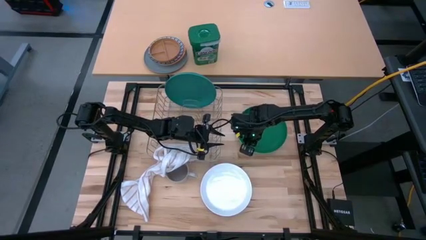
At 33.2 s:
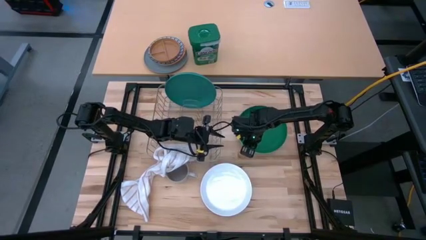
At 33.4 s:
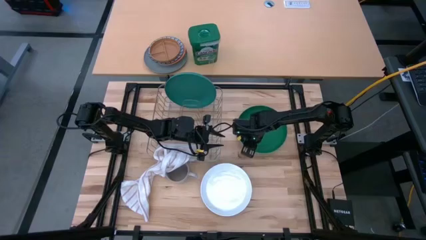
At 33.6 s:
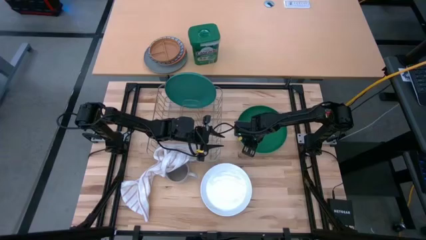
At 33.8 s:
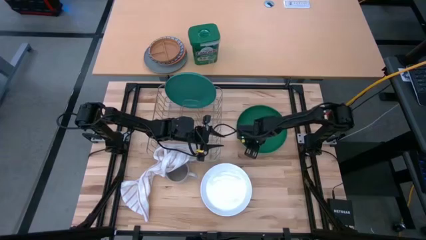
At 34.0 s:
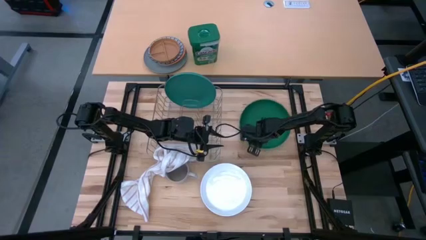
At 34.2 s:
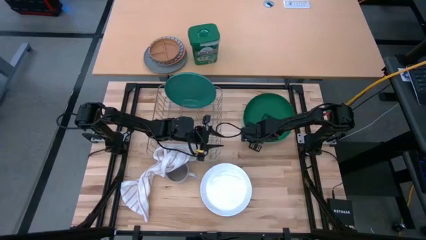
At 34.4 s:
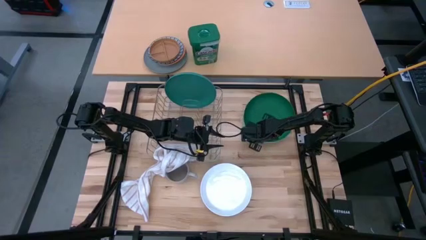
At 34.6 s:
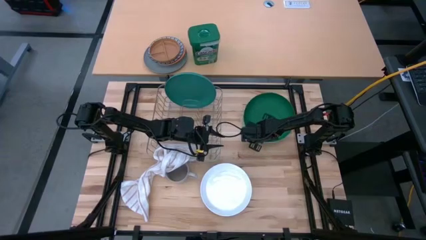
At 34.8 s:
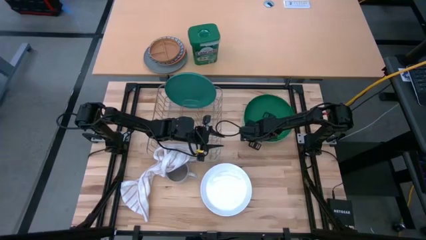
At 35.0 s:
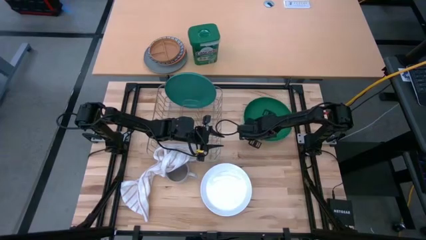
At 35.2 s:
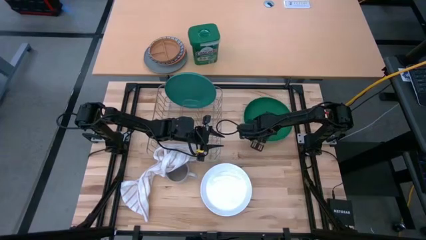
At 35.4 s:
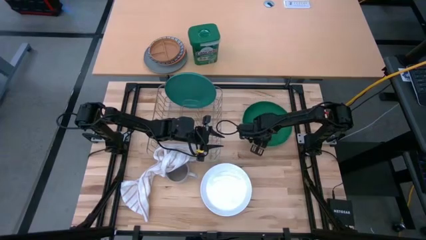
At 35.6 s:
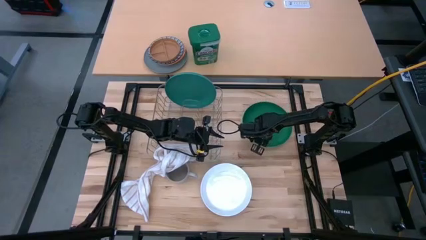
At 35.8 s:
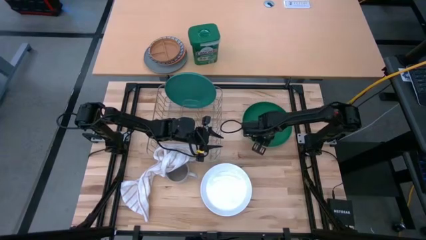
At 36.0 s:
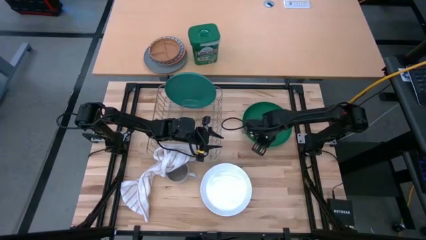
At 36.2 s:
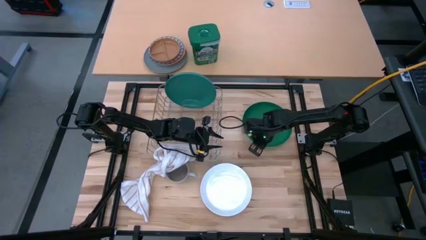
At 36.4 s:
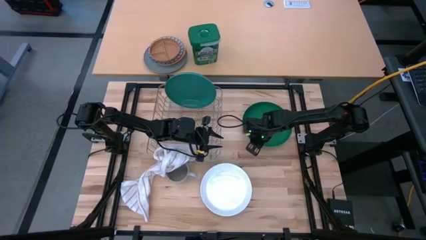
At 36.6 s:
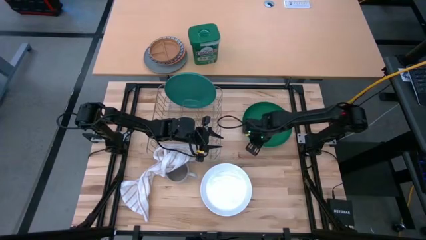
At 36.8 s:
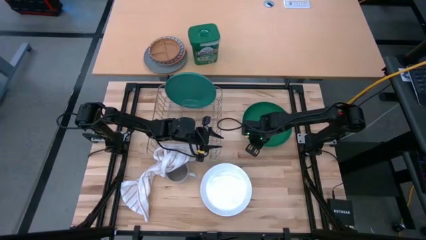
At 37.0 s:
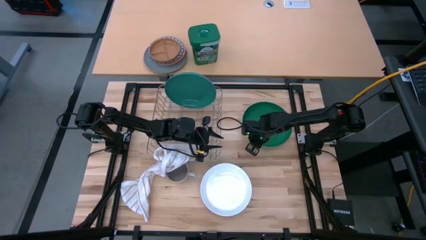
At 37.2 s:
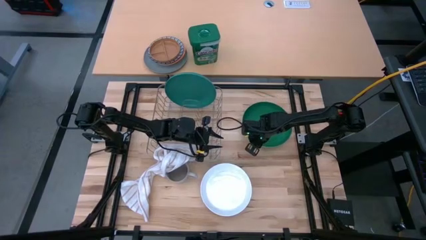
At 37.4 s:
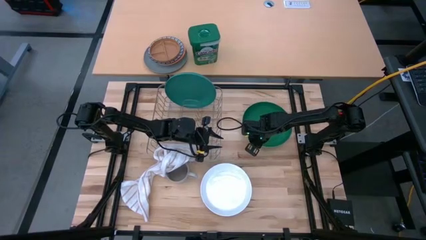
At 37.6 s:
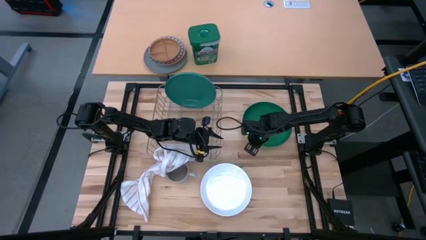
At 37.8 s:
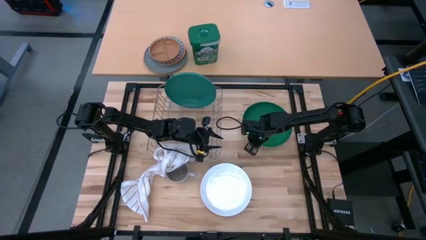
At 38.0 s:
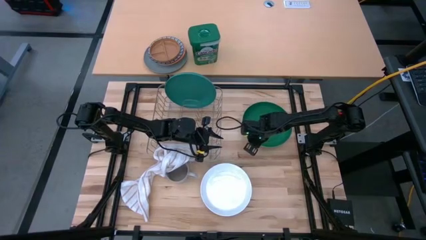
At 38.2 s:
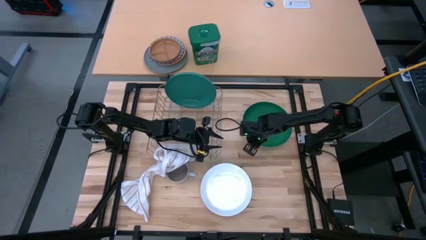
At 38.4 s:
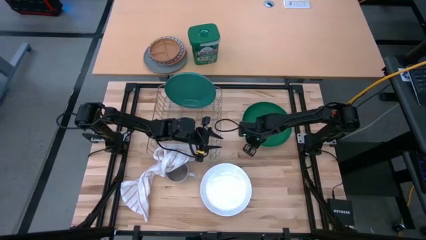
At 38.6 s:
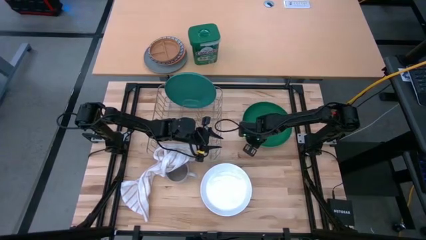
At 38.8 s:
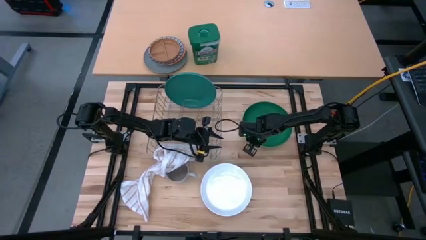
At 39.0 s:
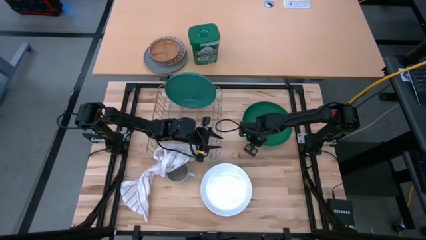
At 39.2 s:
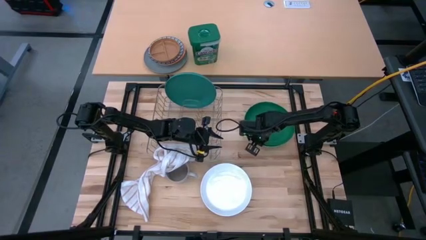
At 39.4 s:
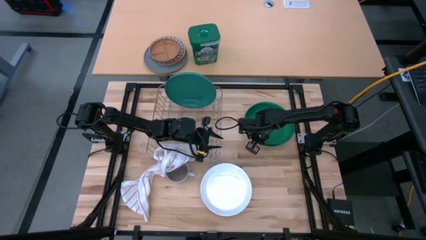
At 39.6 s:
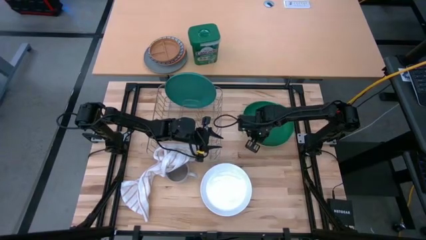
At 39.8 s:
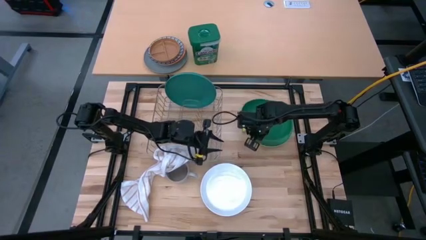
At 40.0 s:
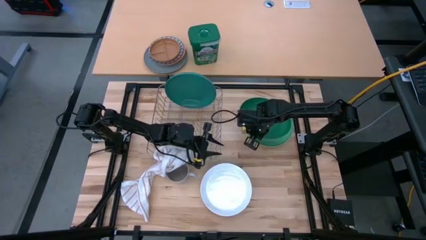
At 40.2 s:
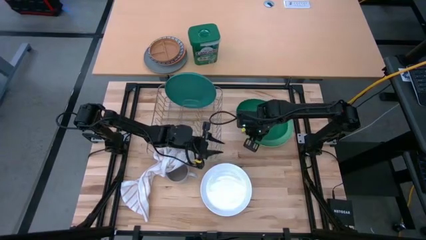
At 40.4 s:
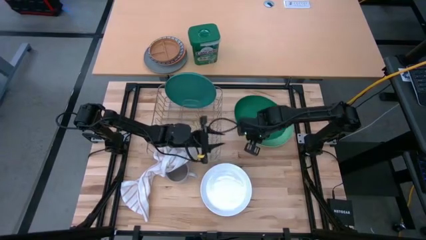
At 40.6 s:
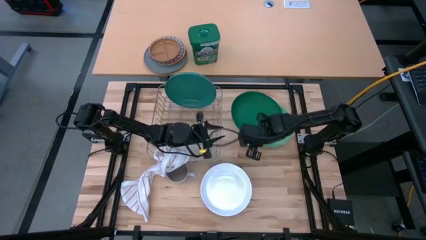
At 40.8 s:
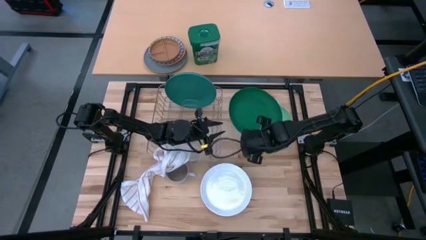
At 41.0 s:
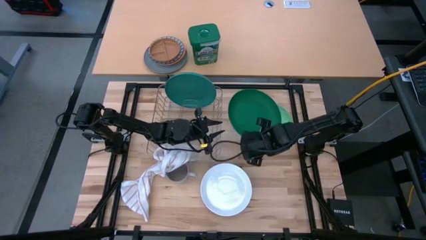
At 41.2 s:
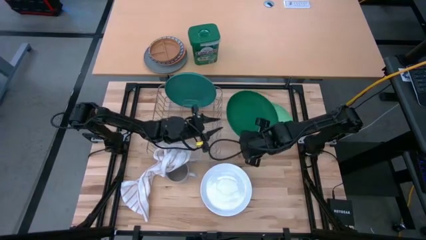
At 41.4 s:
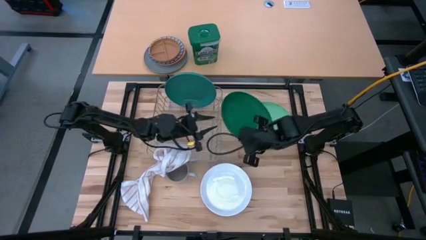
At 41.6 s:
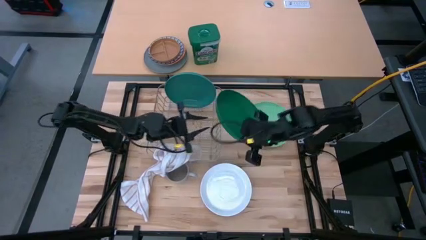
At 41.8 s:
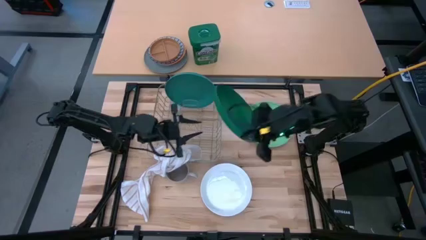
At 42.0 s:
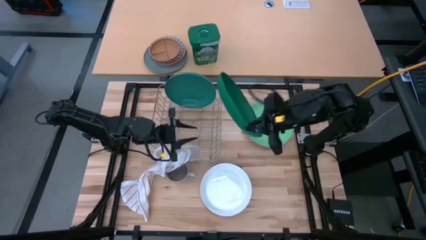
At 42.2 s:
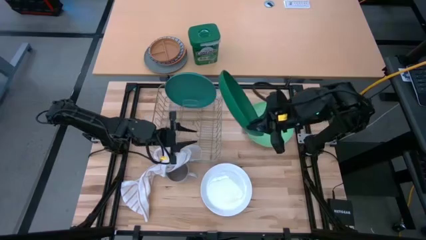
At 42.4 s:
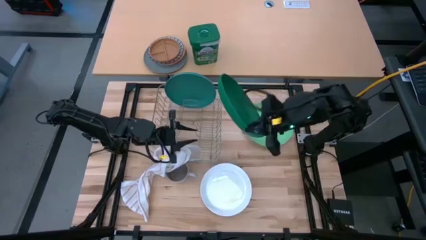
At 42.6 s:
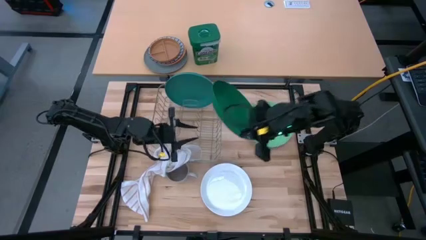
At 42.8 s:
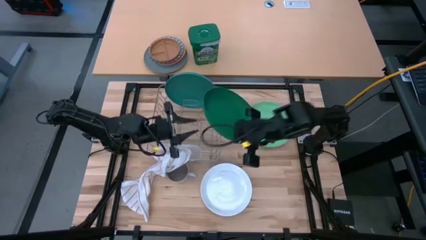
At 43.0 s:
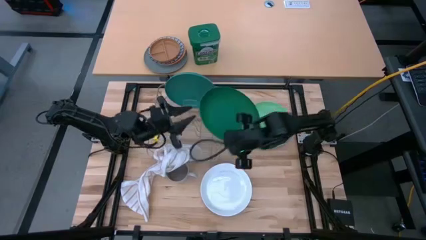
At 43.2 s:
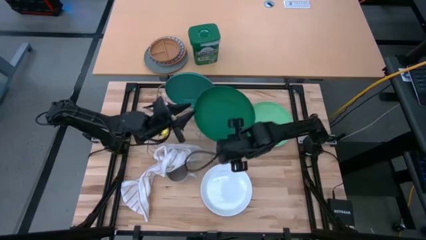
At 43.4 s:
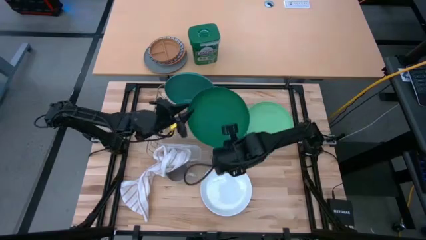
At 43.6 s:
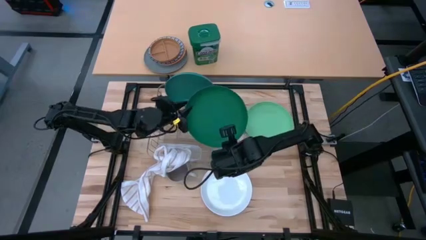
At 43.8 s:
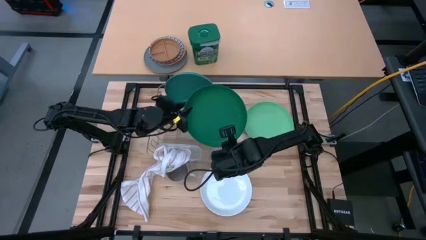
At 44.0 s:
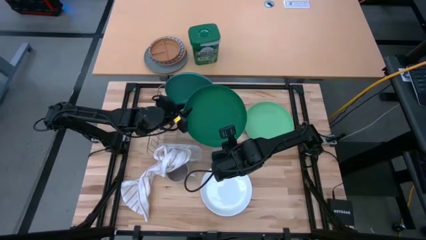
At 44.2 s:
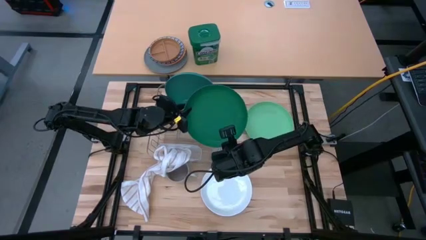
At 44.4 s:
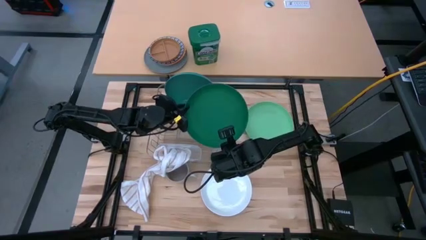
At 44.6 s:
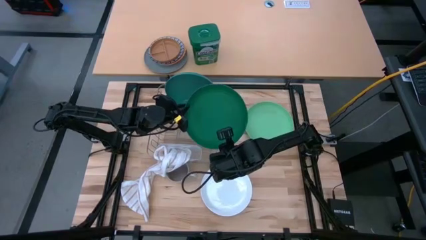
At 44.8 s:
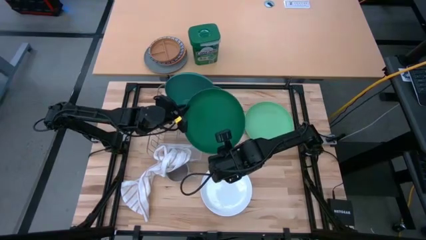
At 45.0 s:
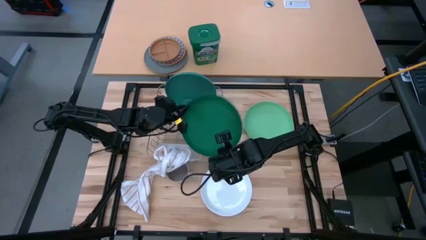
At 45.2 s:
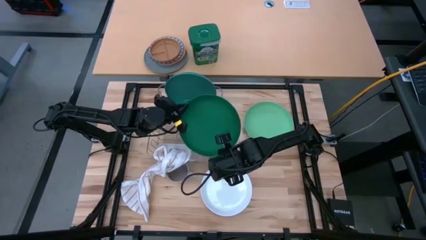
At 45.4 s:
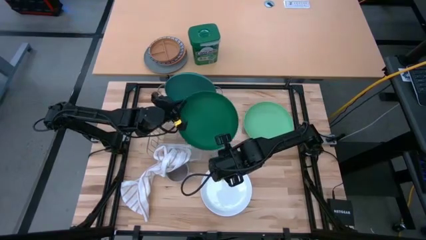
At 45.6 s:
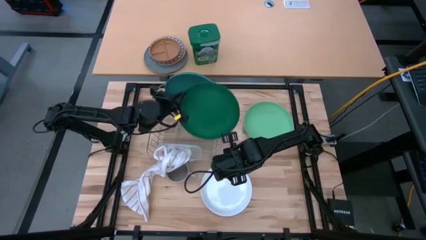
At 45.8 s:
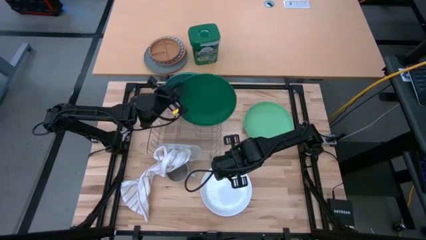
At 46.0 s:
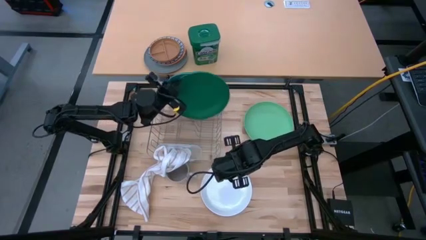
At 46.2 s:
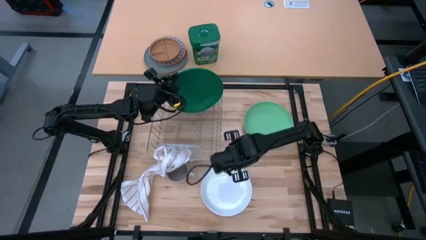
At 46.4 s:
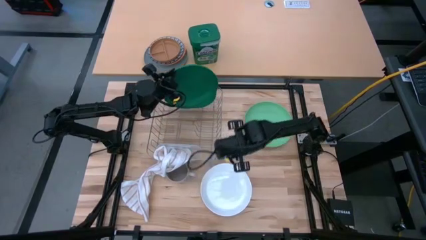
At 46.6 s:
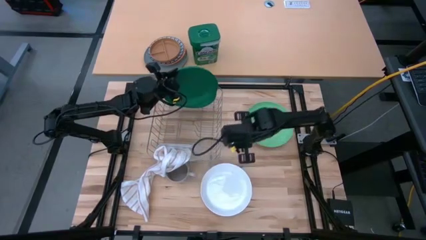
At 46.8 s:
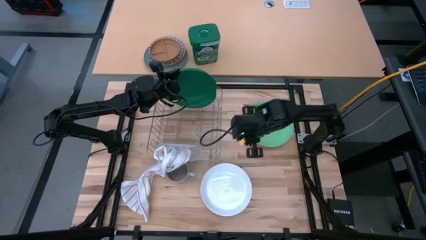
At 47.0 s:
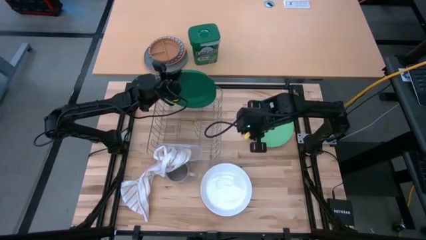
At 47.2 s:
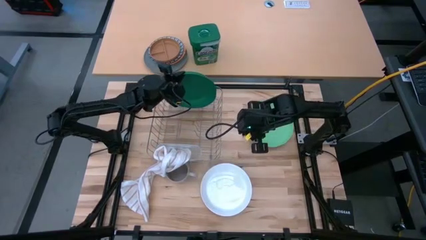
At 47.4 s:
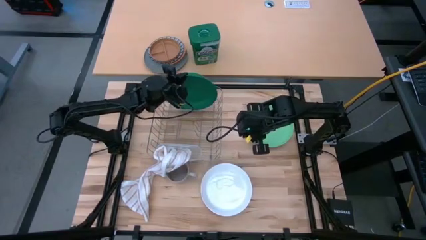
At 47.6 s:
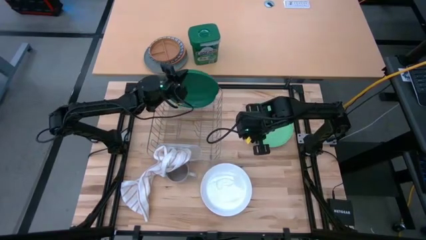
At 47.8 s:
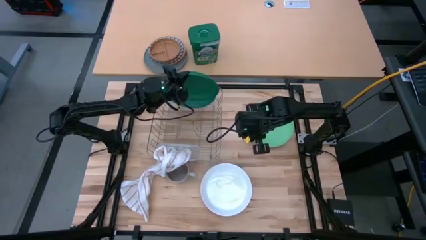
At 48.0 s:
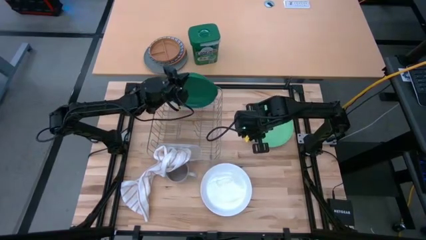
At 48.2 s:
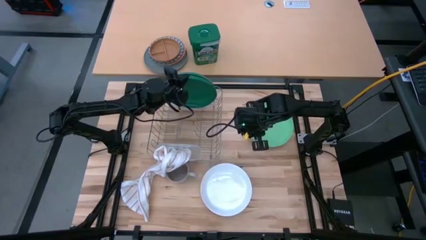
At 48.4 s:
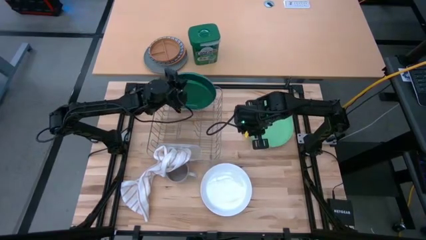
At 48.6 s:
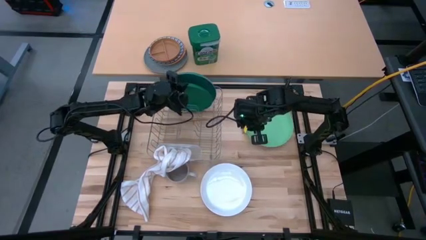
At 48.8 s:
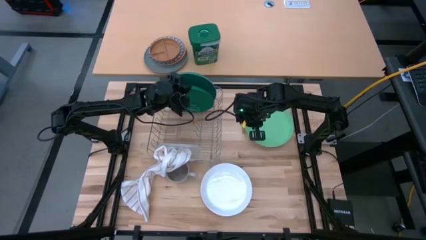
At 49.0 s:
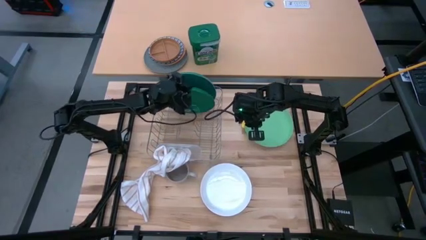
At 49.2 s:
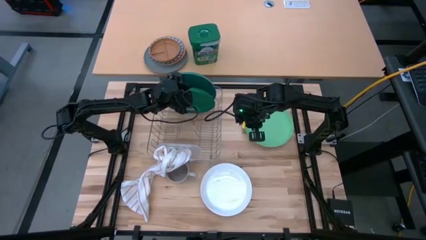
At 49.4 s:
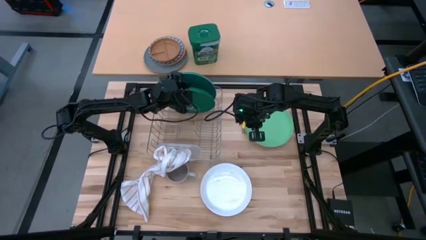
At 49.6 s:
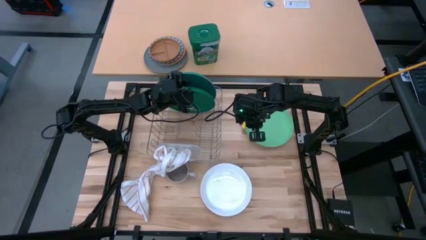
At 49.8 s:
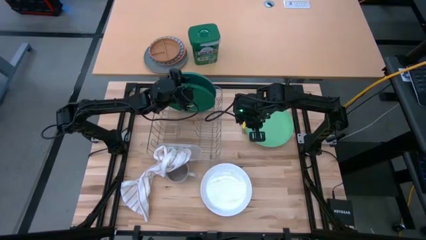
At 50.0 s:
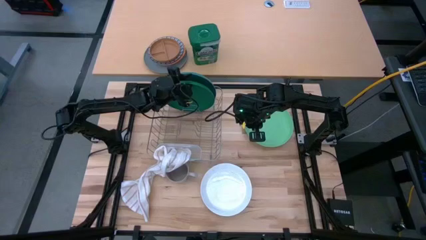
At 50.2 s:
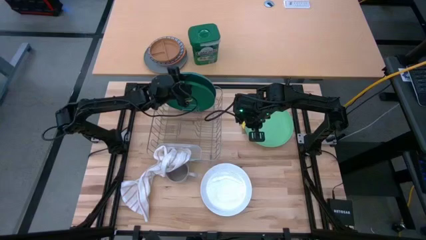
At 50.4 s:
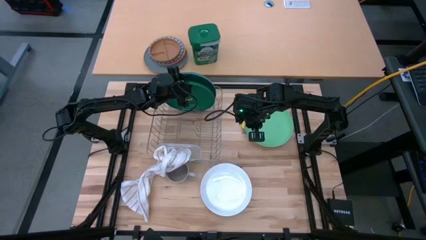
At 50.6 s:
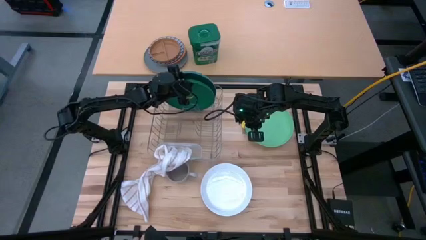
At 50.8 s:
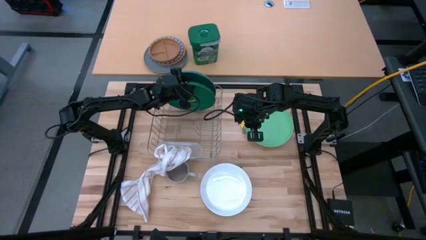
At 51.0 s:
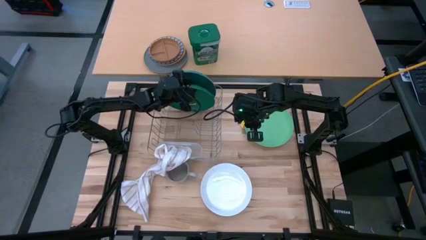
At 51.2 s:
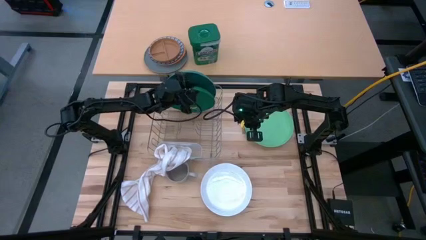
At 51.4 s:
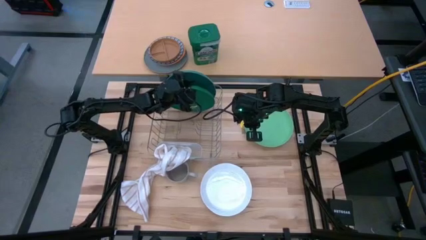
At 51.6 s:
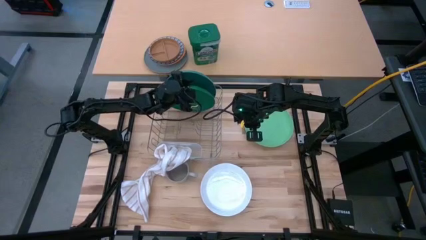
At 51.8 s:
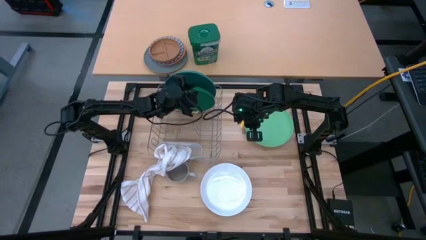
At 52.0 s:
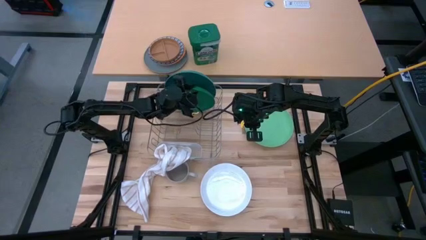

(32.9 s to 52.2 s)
Task: Sort dishes
Put the green plate into the gray dish rack
